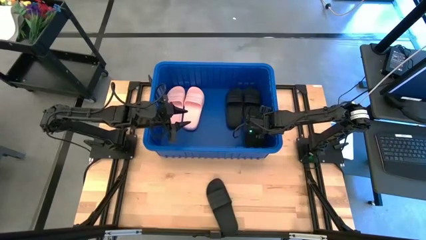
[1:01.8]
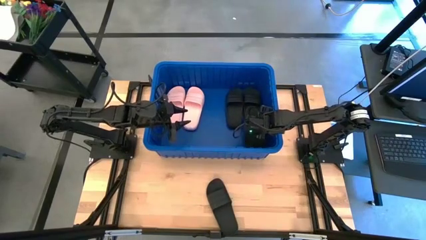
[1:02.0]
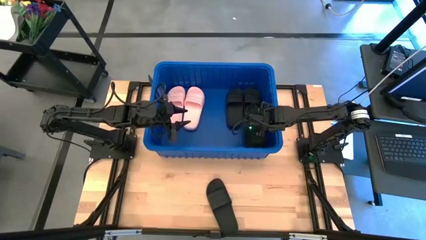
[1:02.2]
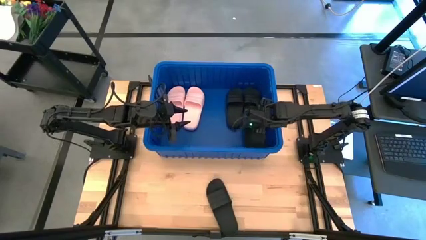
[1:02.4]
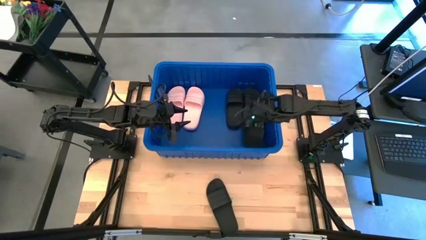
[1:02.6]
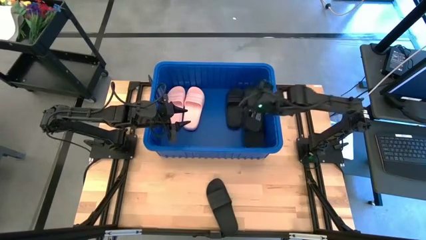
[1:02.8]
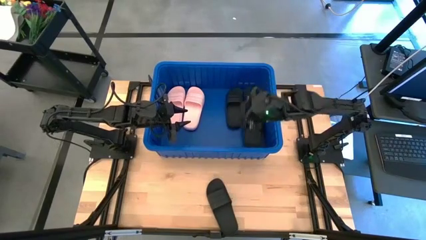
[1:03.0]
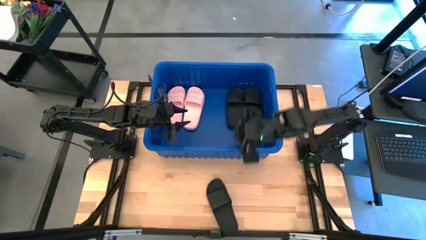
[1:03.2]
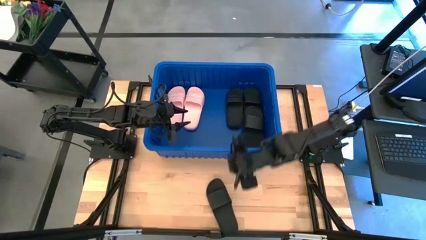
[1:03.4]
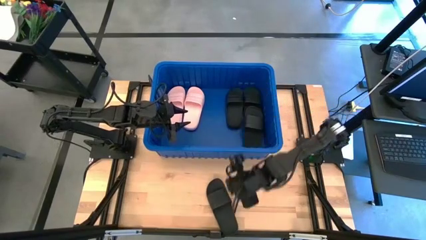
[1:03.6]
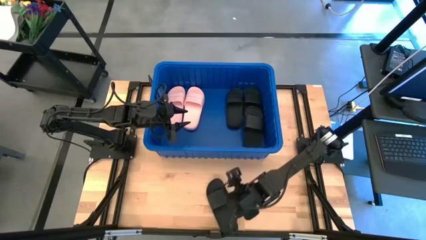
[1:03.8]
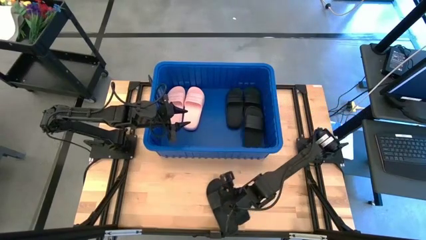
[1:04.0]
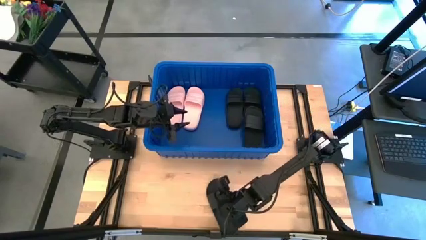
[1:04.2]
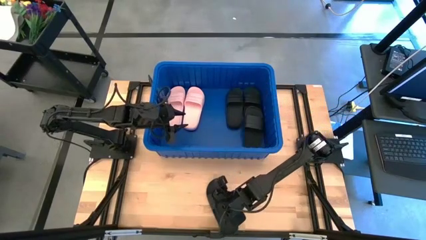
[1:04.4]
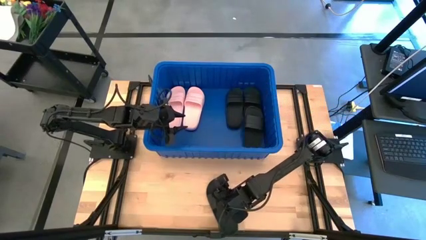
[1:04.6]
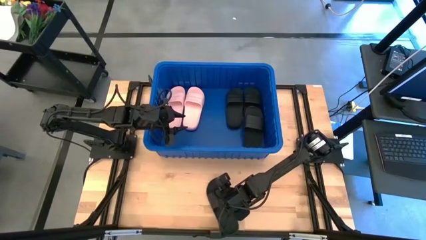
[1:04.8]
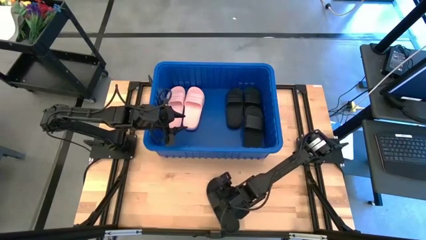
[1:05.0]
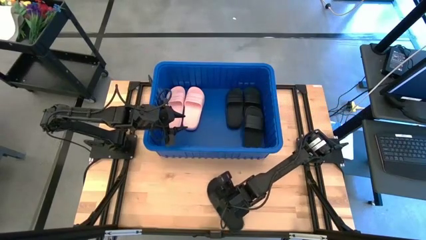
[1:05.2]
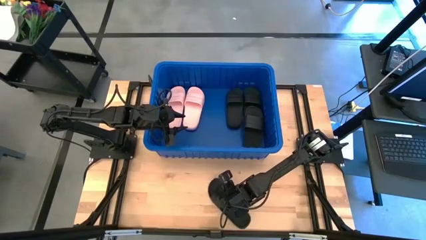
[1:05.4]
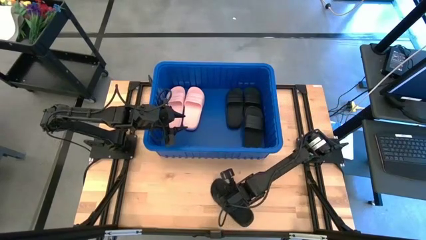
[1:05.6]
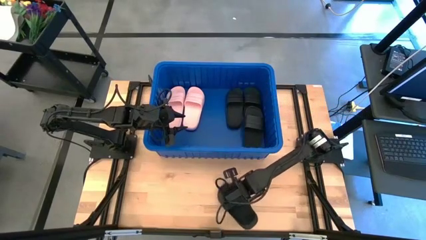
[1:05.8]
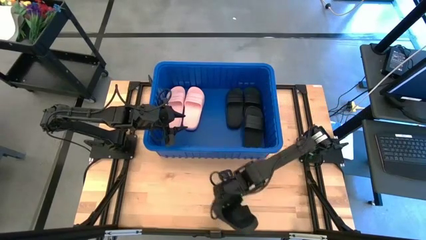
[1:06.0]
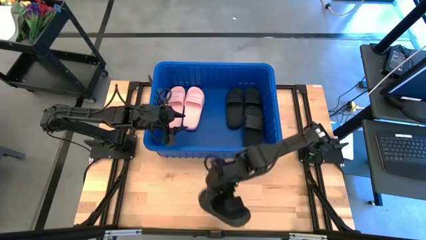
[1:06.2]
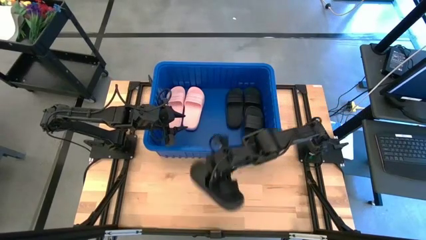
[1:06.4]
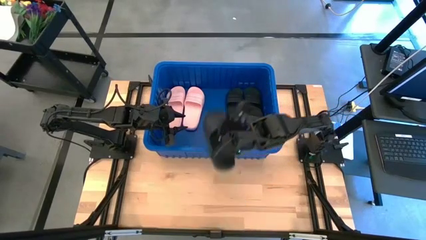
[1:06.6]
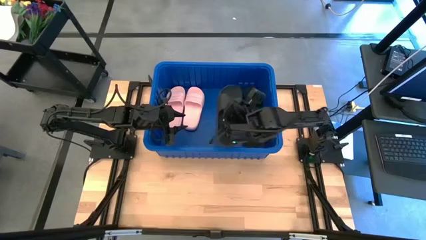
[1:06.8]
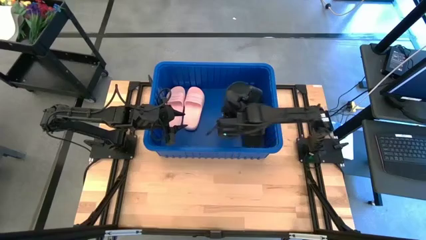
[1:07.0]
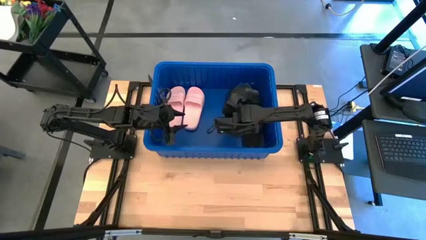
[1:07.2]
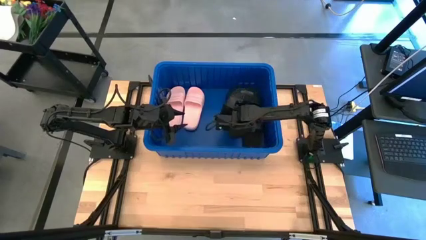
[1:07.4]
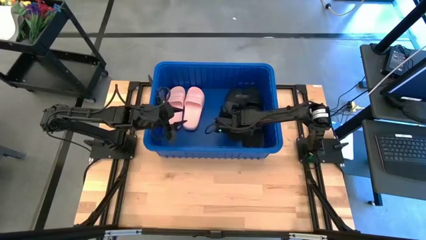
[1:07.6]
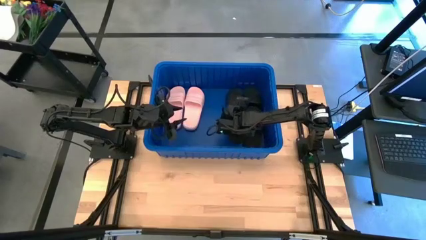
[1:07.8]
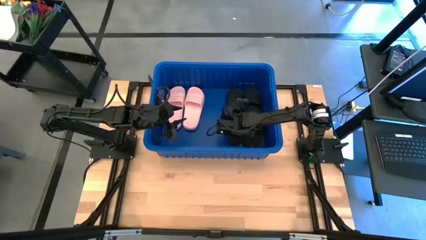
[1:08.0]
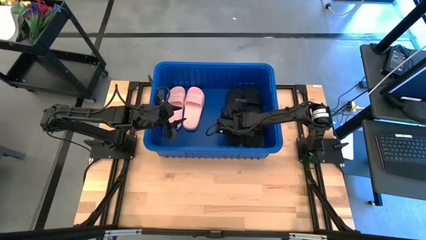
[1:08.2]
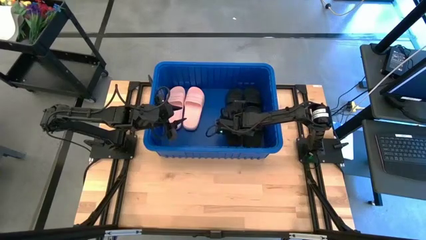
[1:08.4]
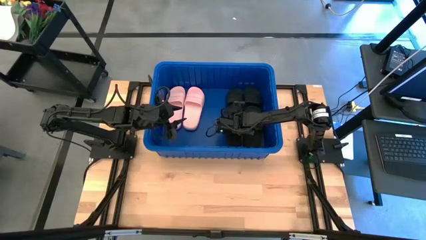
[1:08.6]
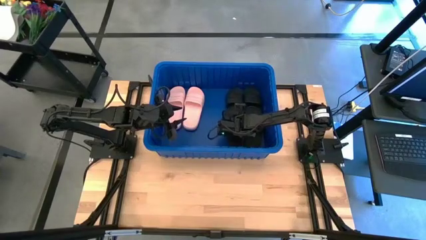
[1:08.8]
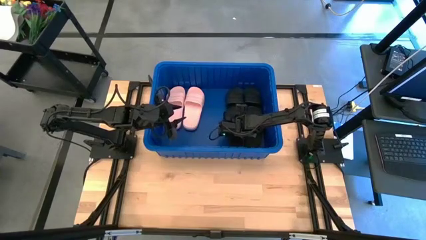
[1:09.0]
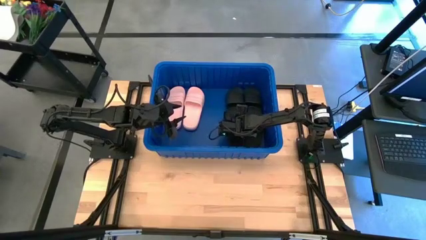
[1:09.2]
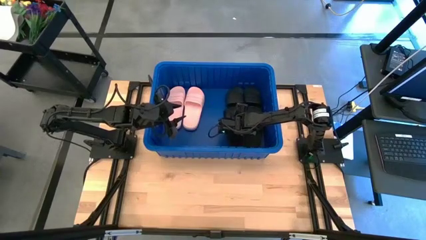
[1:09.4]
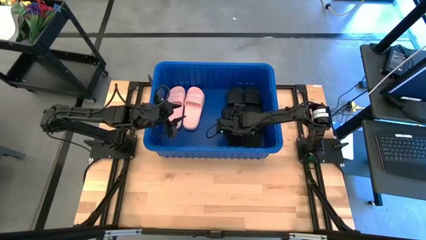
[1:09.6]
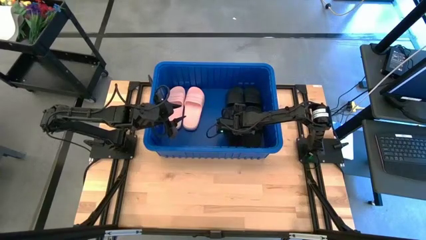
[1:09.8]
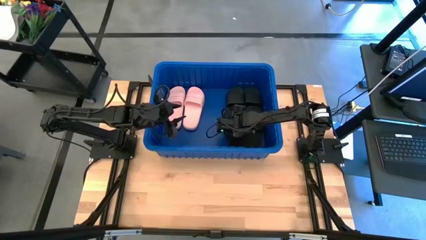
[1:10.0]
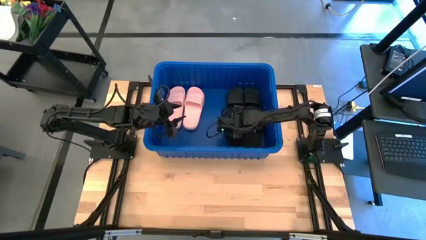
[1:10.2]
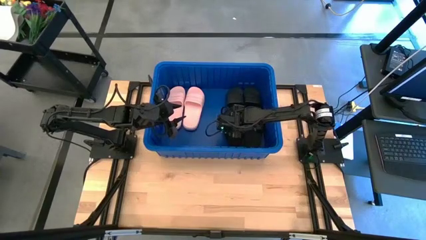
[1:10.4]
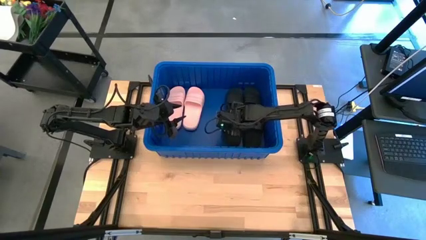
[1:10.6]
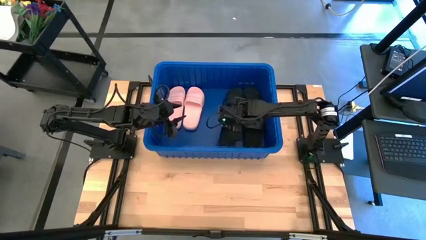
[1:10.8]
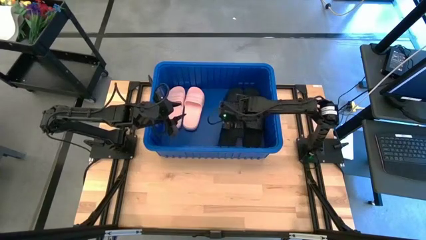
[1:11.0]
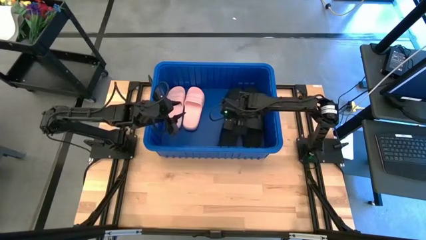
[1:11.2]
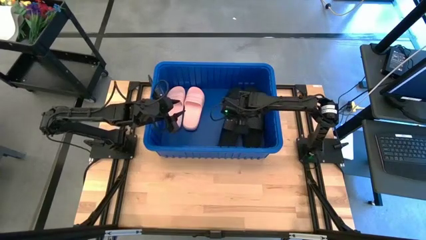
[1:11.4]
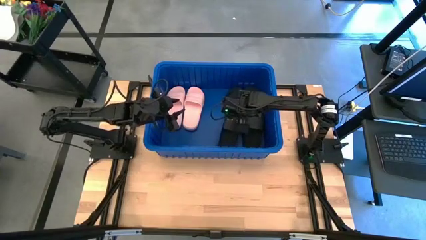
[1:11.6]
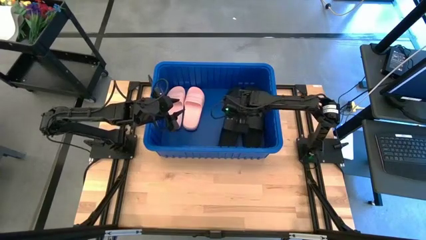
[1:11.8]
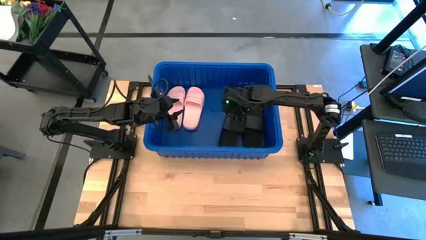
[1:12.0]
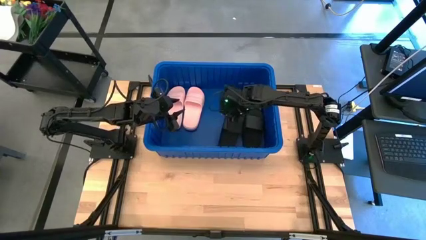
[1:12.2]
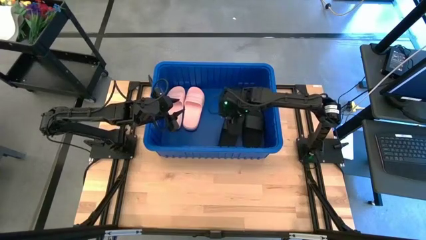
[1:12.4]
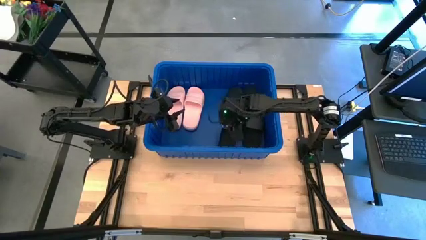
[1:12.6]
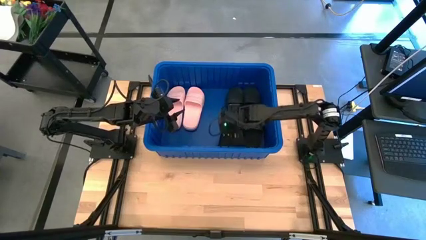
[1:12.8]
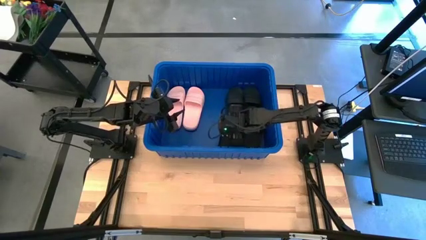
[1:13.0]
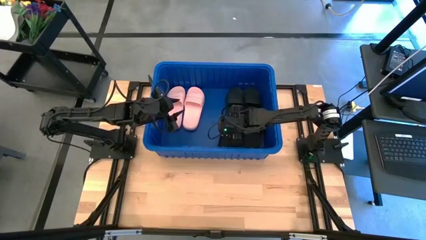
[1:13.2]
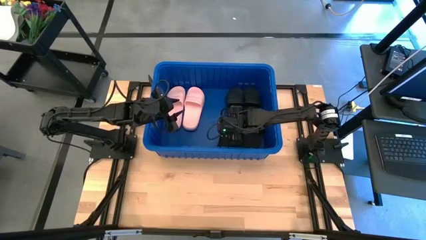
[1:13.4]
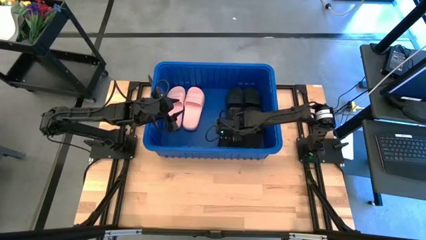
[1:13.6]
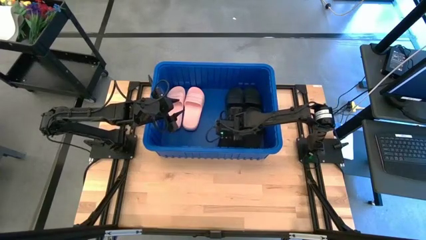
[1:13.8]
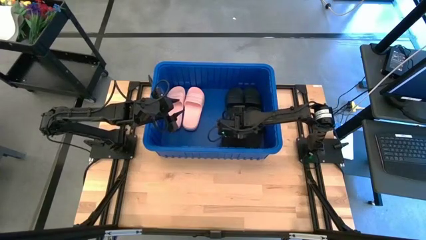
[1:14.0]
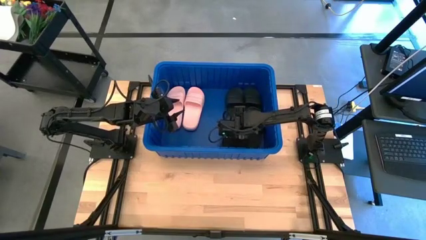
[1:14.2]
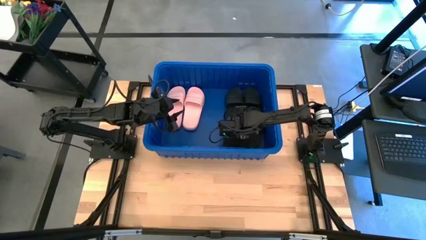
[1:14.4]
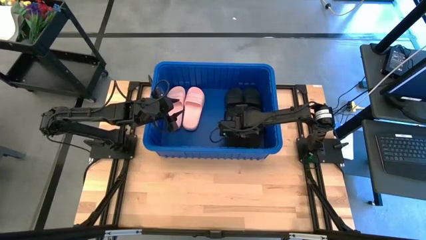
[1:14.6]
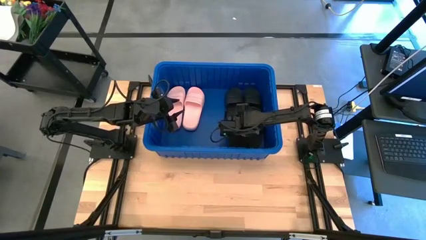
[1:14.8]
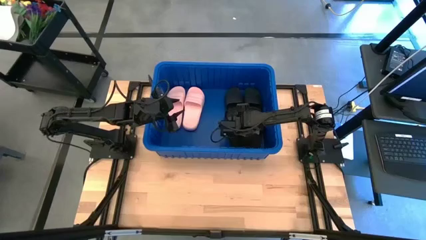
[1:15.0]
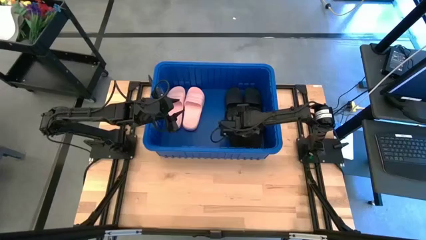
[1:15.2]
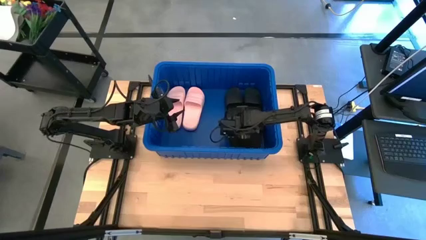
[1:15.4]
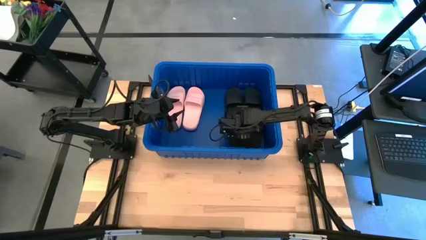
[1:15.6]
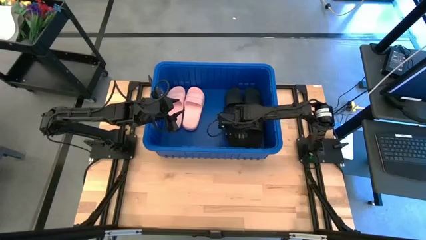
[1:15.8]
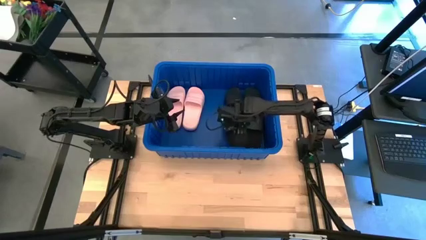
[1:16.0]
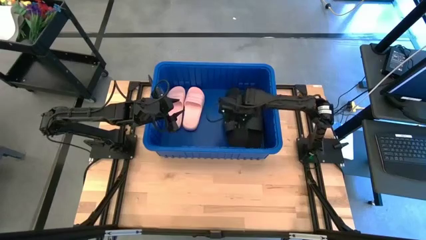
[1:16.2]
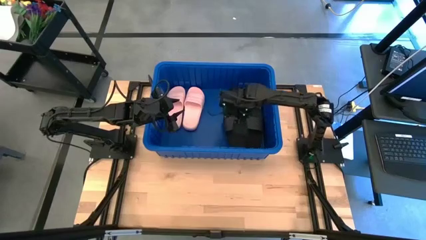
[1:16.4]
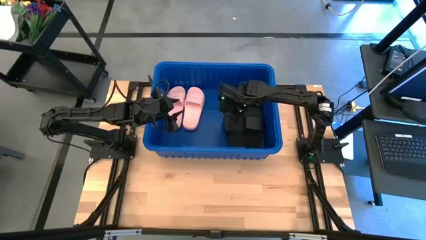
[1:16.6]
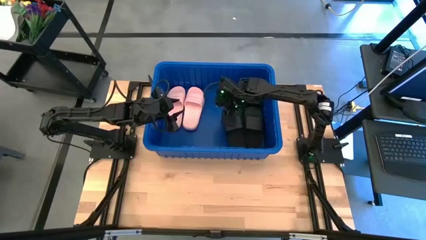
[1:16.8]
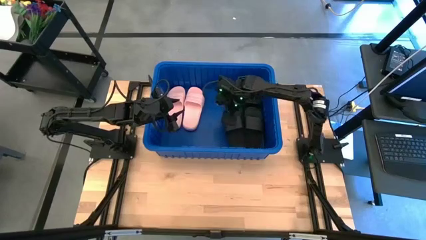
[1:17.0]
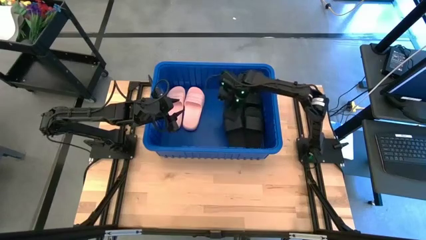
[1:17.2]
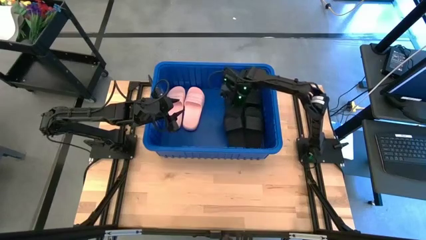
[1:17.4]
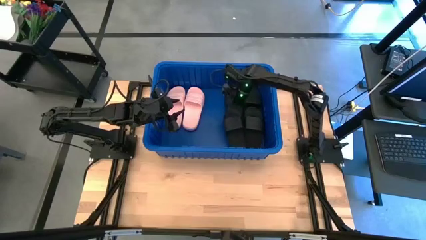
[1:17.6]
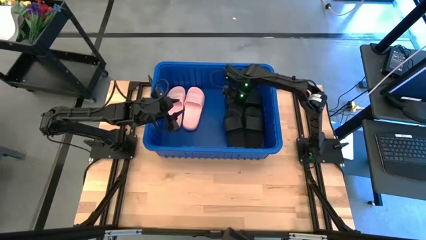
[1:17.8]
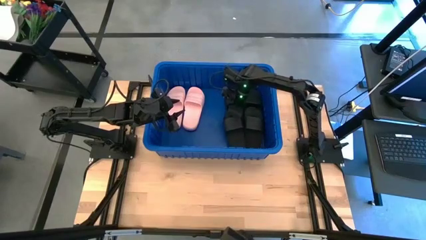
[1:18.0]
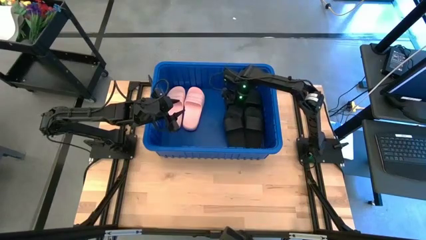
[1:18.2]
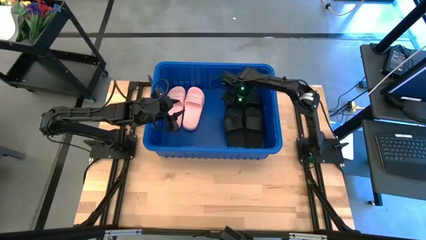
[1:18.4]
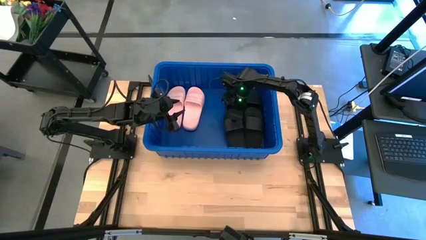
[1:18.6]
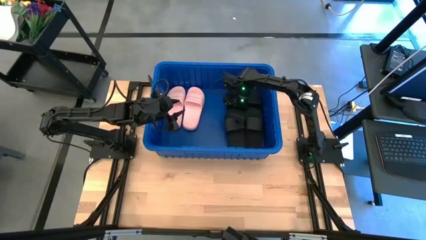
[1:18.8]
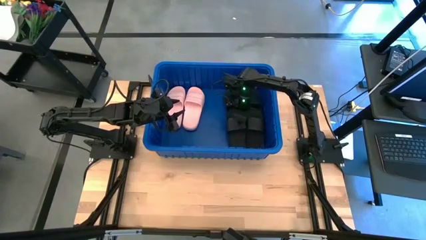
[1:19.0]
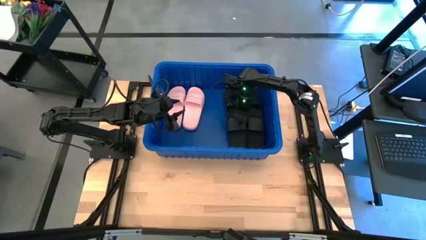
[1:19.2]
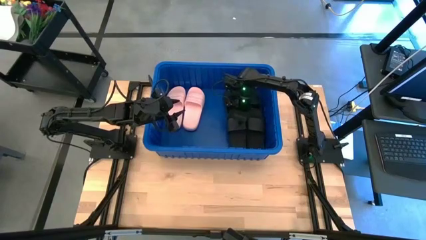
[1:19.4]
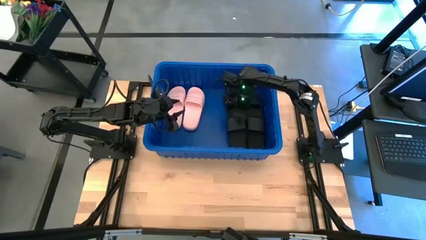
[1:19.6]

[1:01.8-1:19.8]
Task: Pick and place slides into bin
Put the black slide into the blue container
